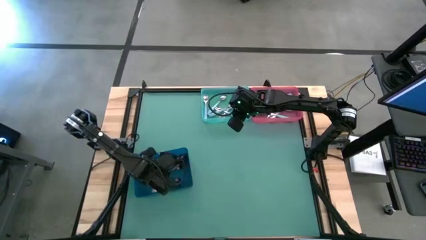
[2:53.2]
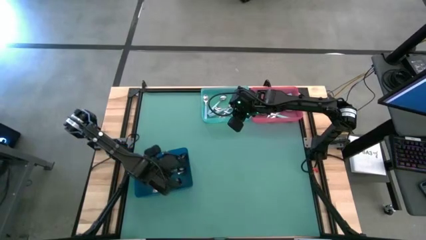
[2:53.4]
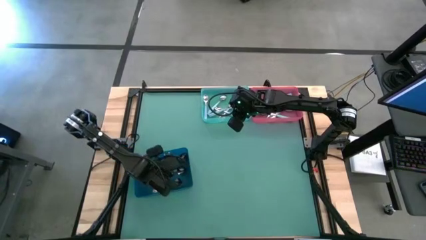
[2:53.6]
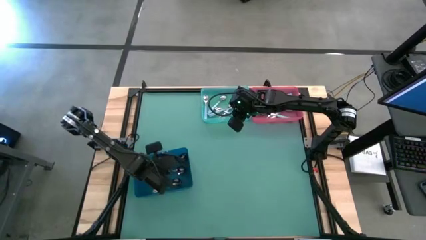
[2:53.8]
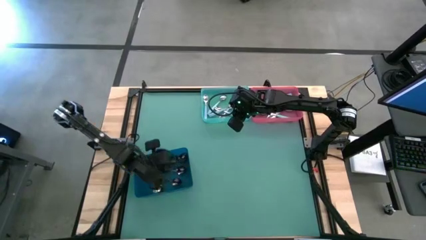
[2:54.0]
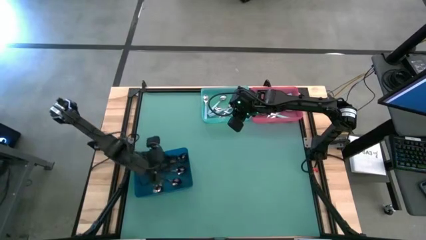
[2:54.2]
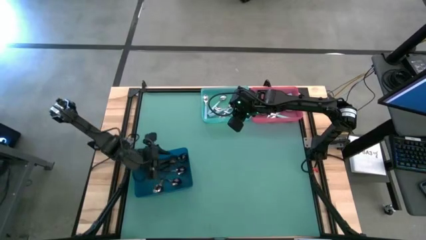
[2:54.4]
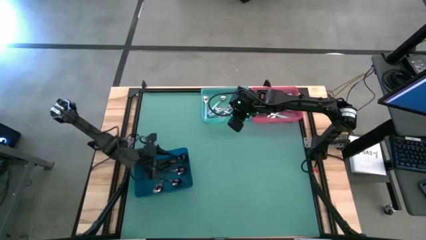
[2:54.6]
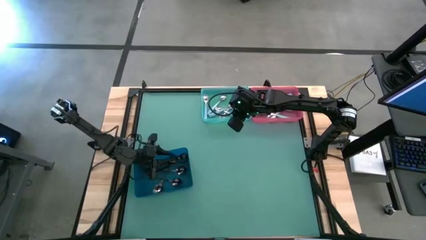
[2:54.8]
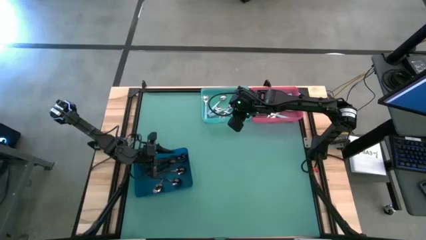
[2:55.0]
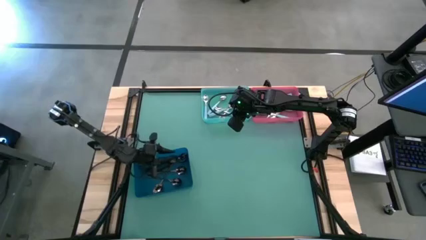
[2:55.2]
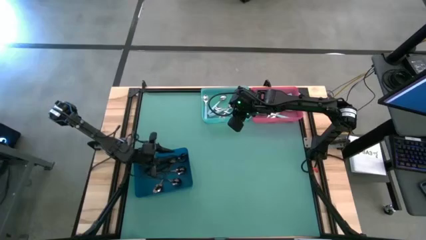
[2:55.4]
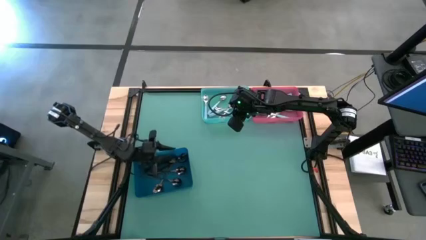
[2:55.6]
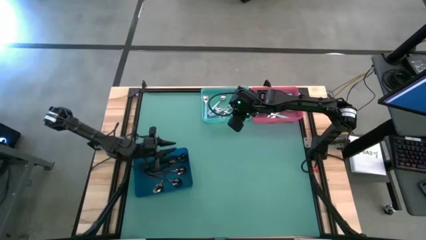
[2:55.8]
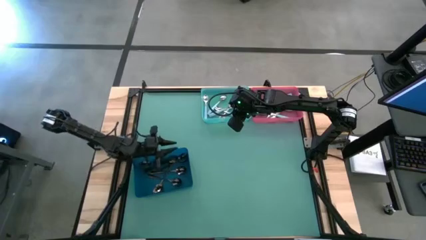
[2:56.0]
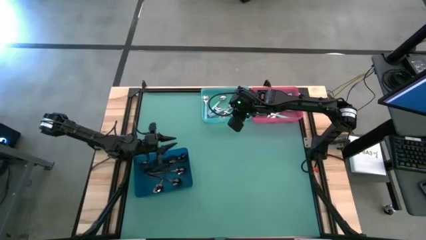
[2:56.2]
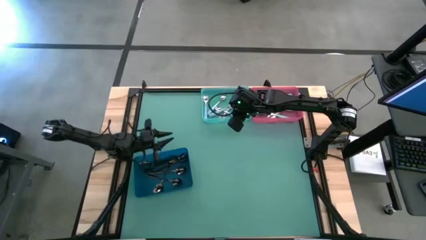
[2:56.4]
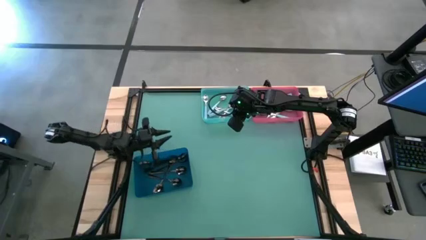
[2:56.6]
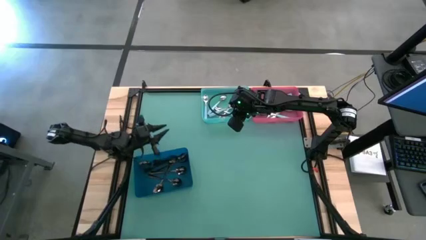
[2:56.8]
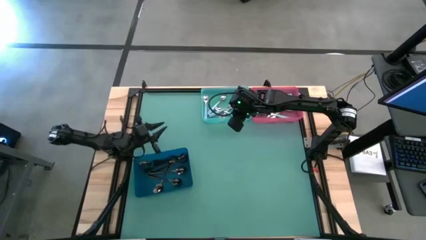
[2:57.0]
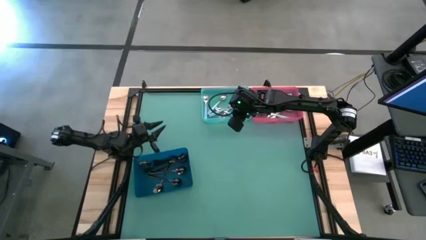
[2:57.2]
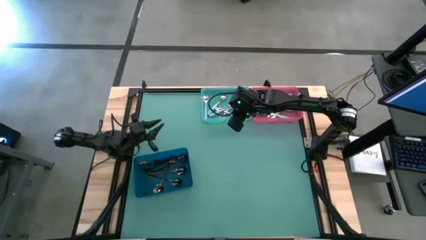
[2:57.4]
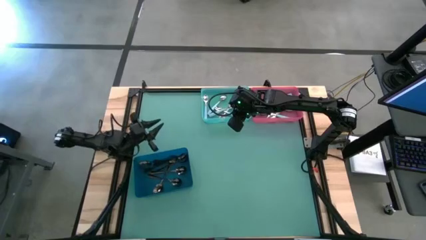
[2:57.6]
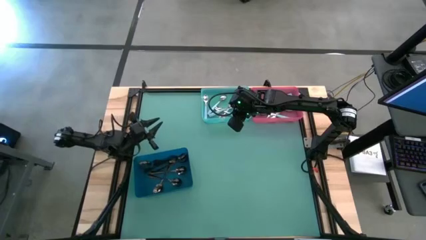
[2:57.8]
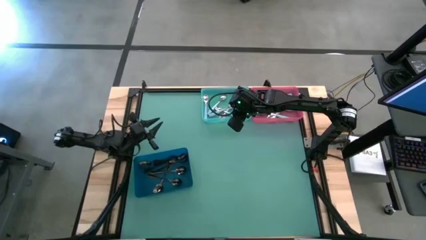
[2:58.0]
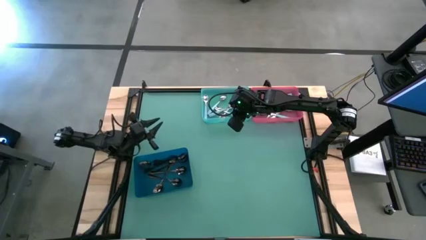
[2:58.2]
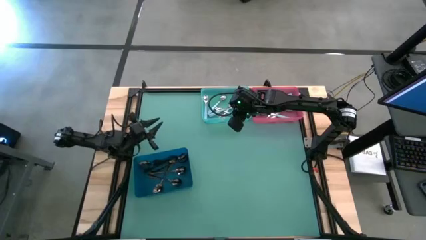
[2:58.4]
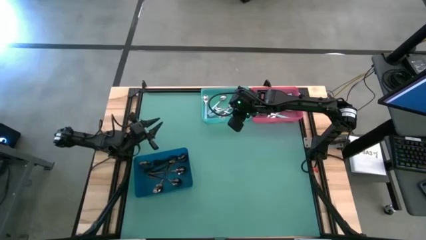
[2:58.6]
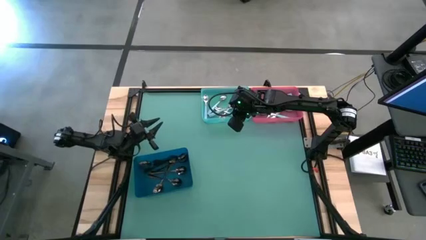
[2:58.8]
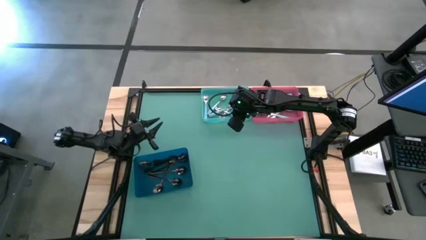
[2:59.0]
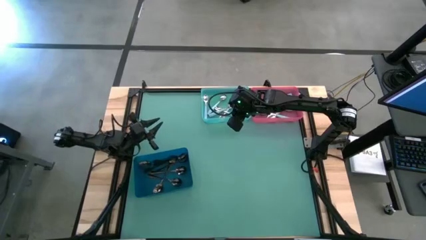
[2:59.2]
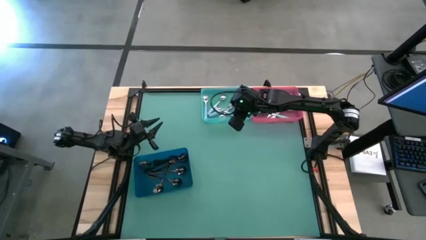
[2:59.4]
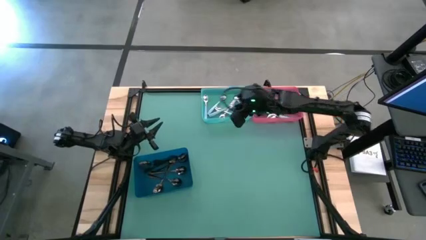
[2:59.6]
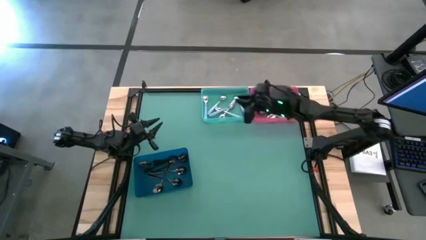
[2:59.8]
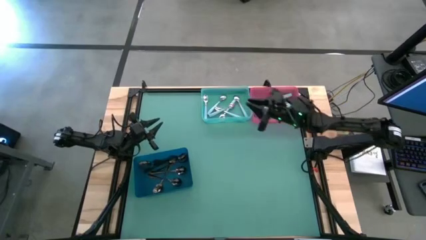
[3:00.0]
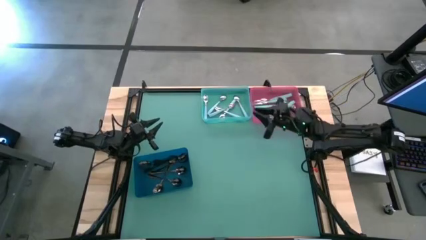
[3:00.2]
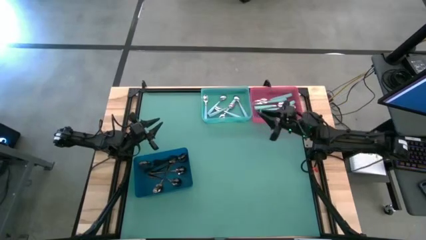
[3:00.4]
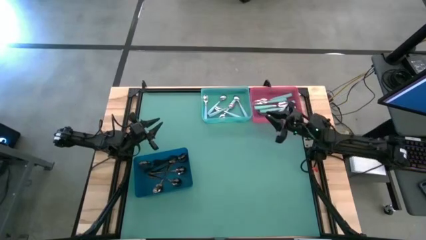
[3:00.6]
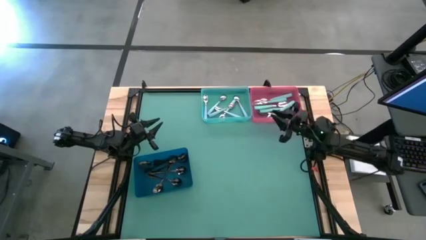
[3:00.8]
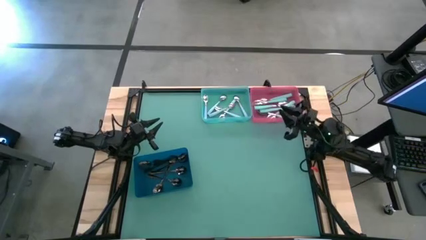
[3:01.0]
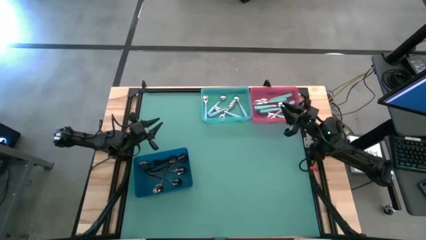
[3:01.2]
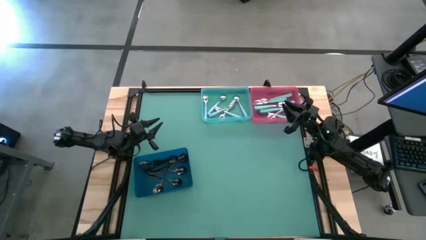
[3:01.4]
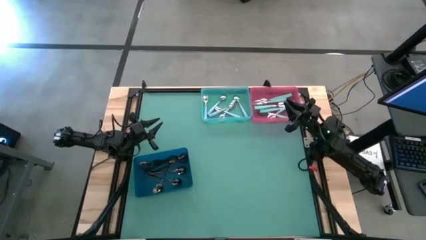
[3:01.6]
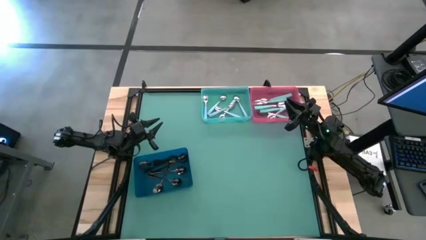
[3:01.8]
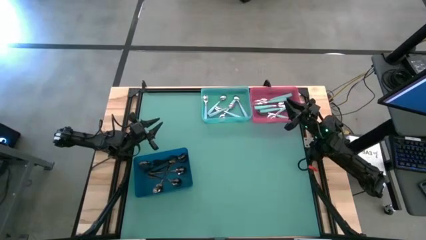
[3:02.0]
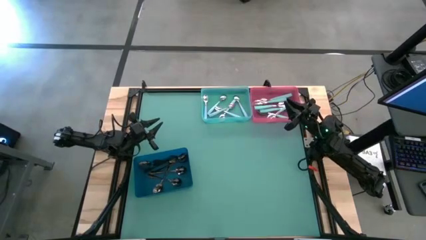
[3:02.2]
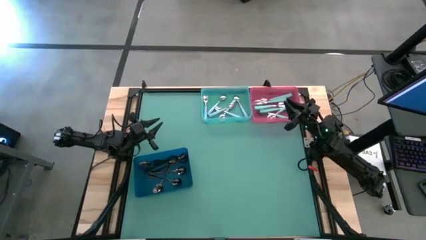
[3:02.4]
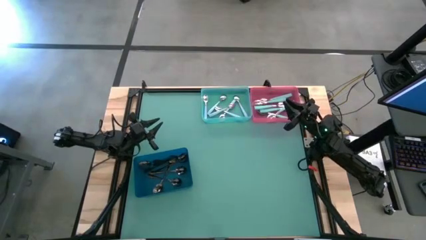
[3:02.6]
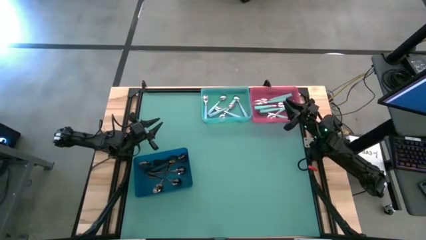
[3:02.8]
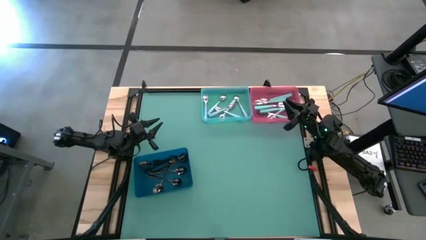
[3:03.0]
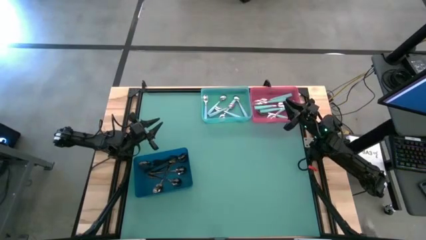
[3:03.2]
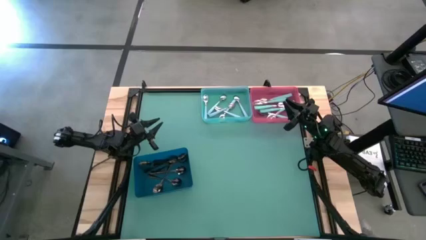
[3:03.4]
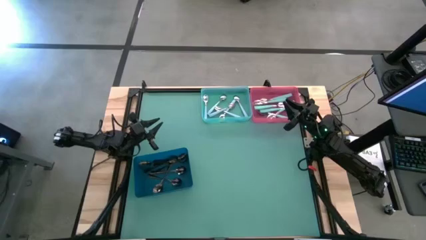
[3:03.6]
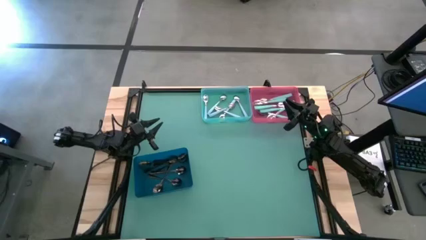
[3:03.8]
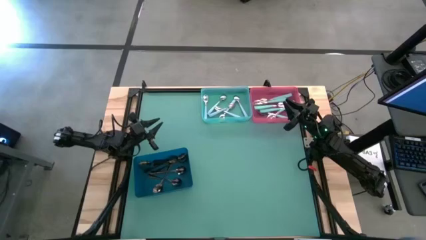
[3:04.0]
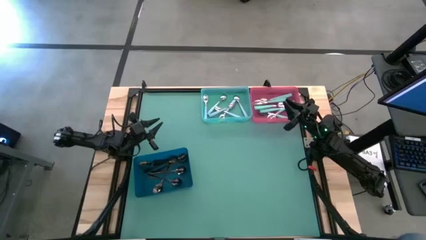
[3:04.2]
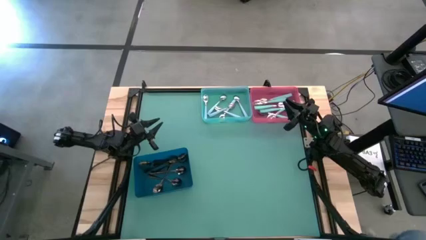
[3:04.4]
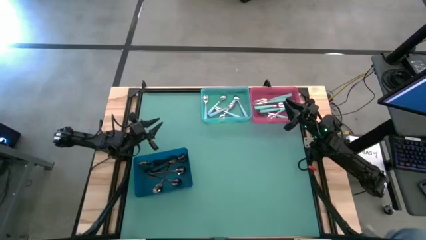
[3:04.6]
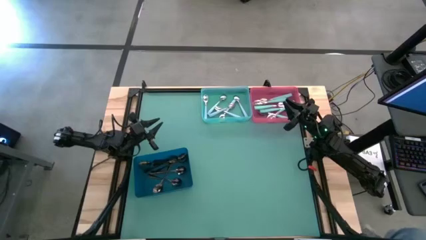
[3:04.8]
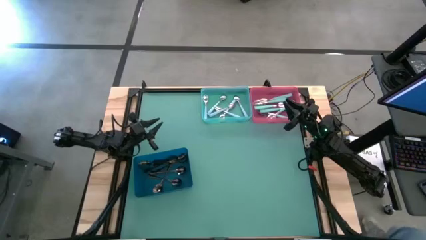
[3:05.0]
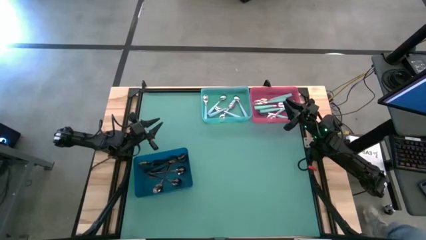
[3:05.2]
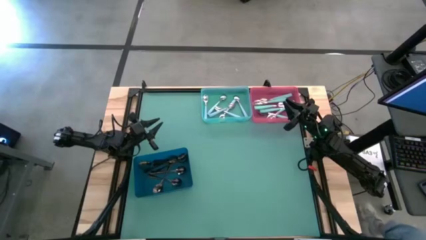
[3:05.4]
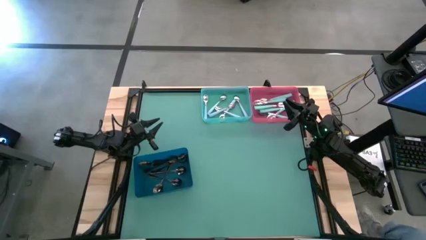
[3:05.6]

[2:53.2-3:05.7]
Task: Sort silverware by color (type)
Return to Home Position

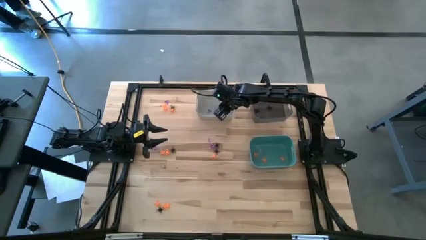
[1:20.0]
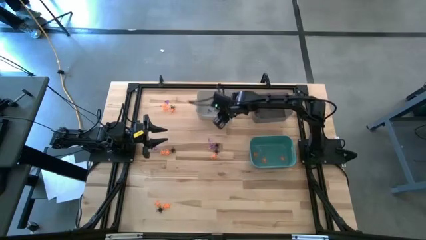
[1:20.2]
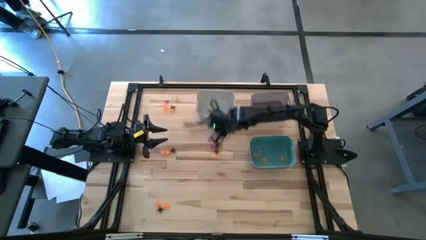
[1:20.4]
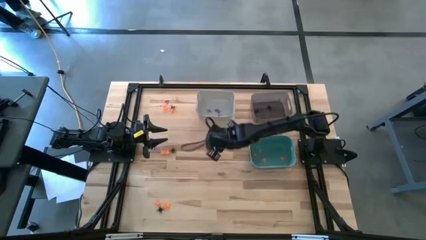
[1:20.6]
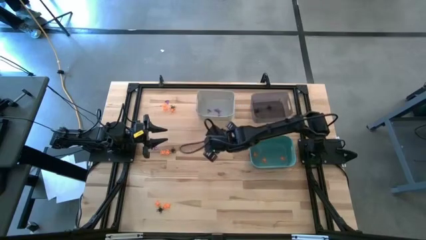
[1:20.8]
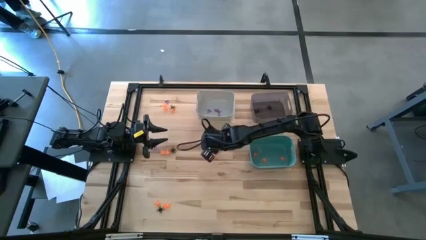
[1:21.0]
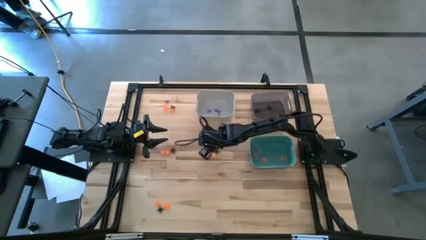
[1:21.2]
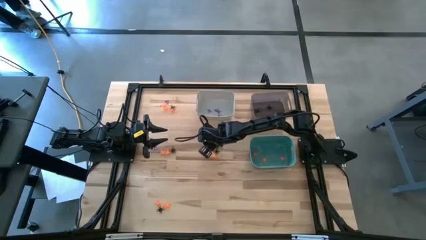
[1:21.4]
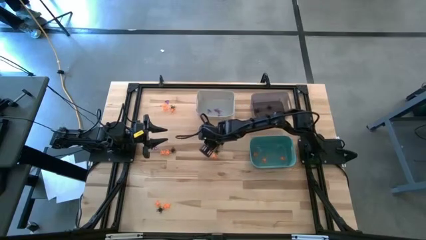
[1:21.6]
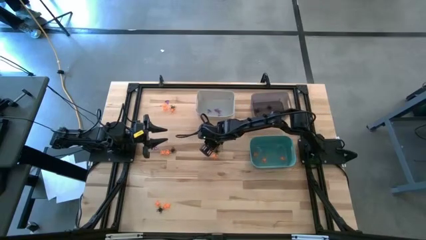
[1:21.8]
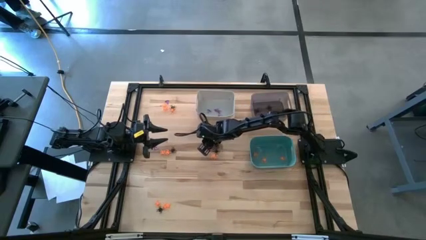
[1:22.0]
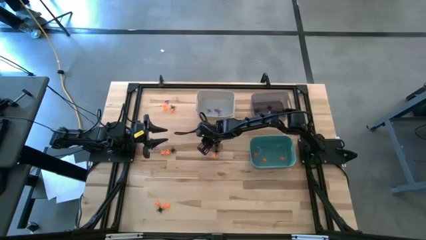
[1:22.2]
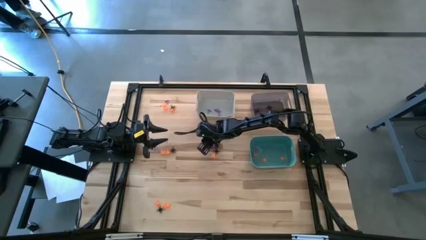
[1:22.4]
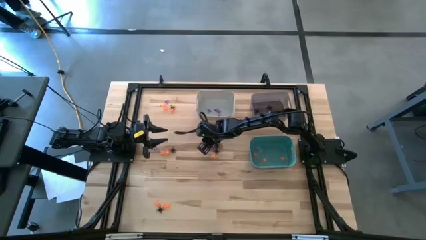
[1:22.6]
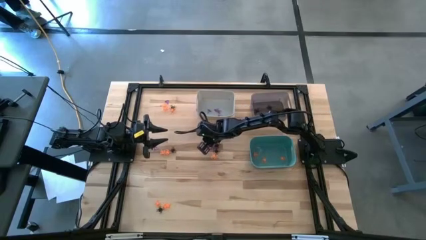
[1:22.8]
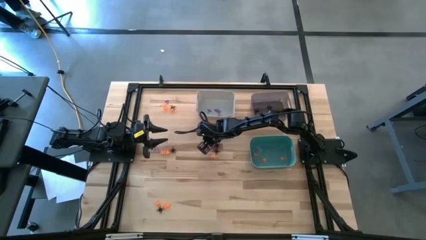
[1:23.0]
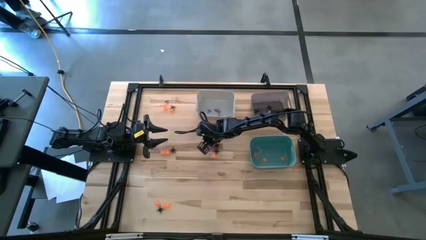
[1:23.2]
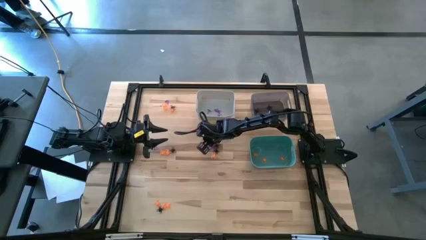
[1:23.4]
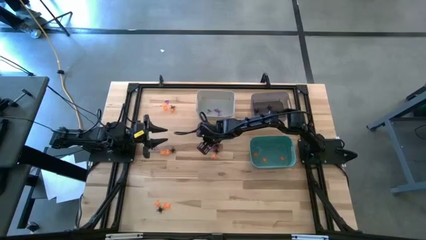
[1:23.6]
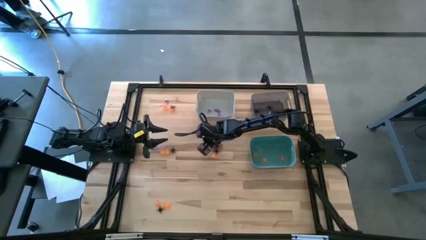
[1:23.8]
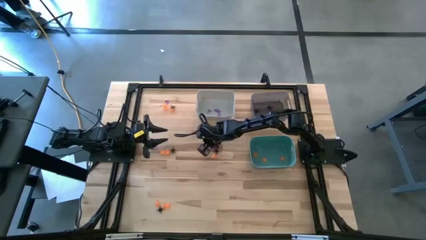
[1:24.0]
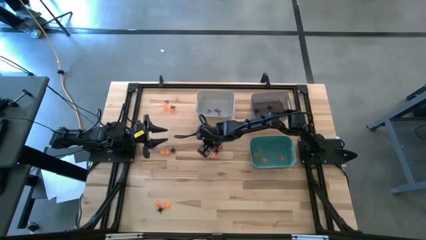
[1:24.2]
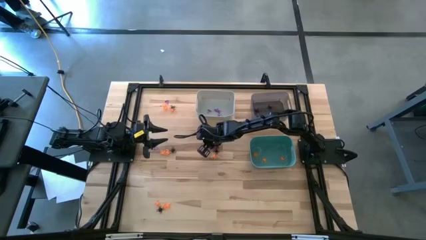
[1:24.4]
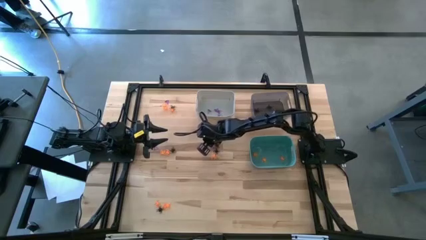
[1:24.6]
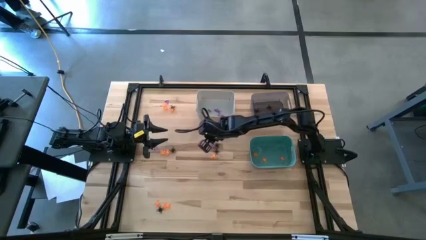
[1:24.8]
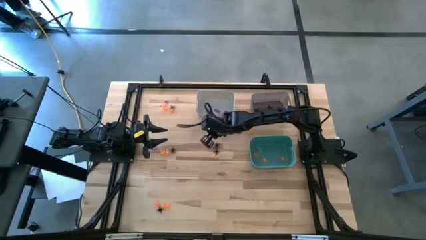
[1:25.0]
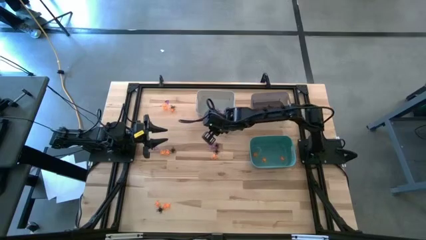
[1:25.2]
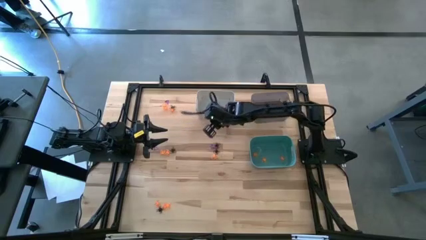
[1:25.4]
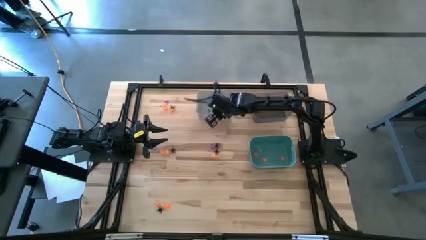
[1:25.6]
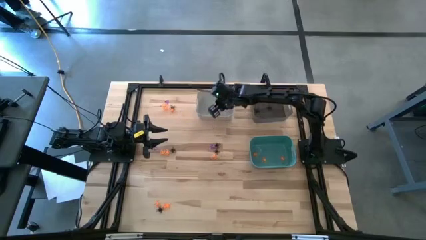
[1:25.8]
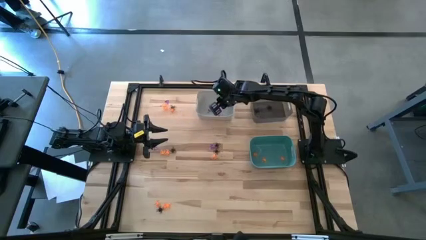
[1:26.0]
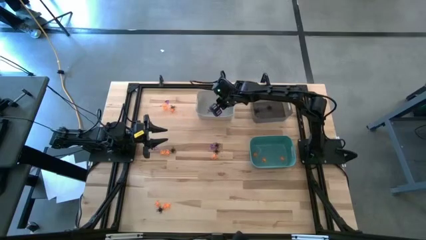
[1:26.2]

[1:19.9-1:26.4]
Task: Sort Halloween decoration
Put the purple witch hat toy into the white bin
